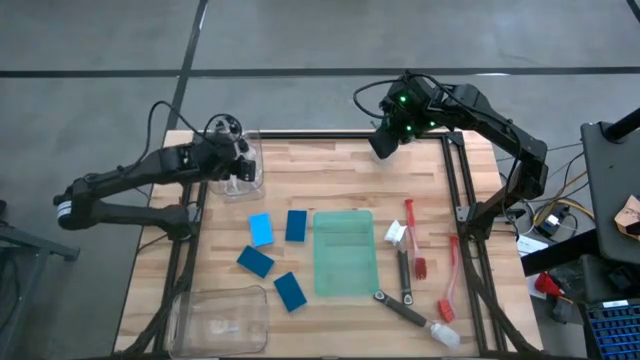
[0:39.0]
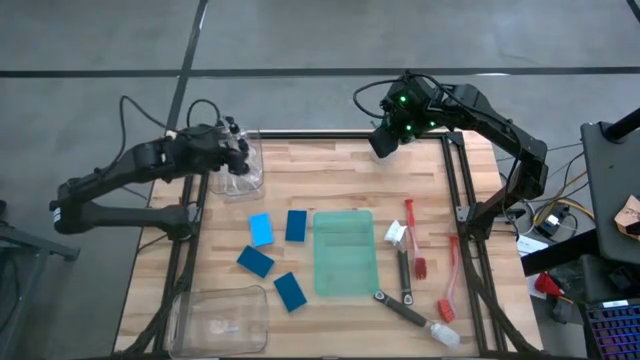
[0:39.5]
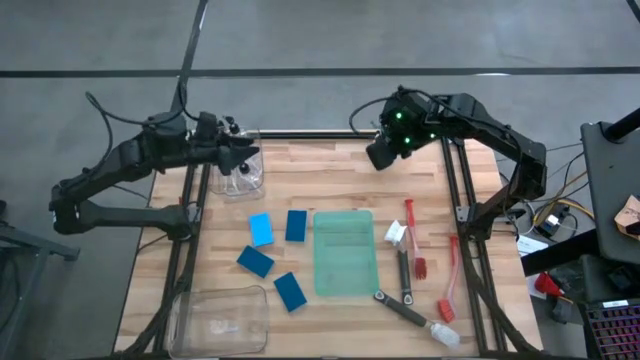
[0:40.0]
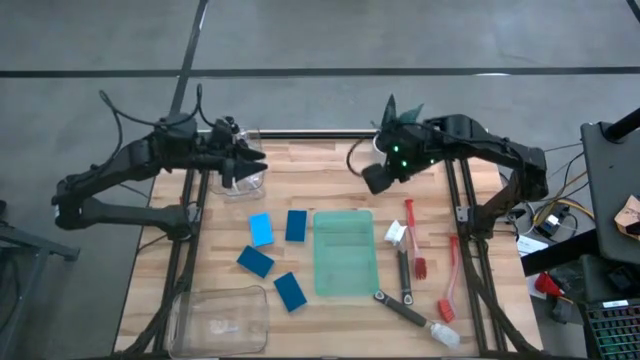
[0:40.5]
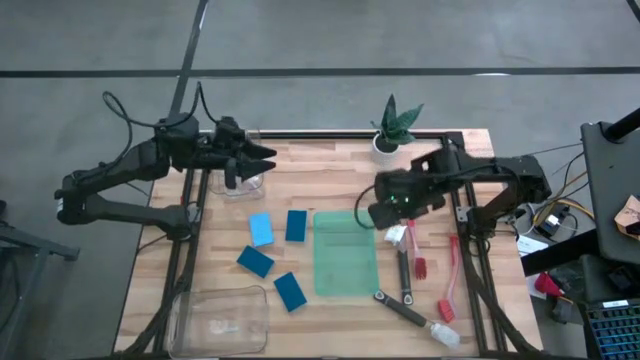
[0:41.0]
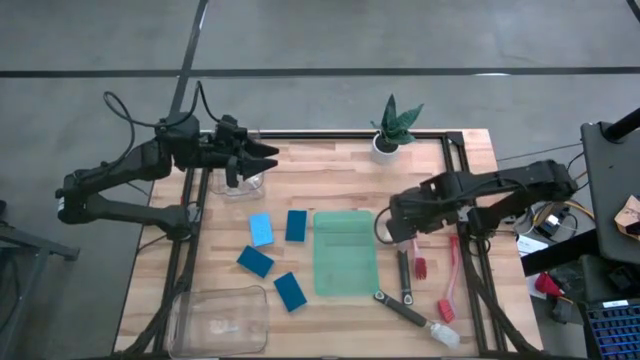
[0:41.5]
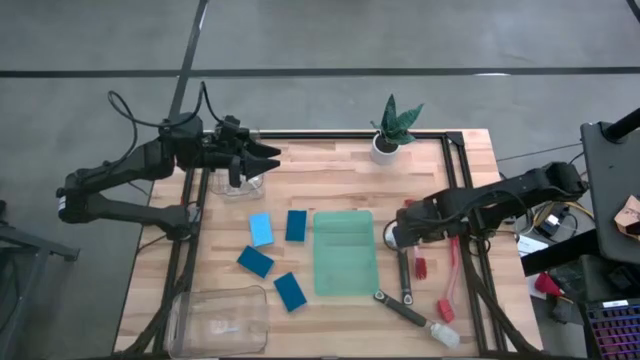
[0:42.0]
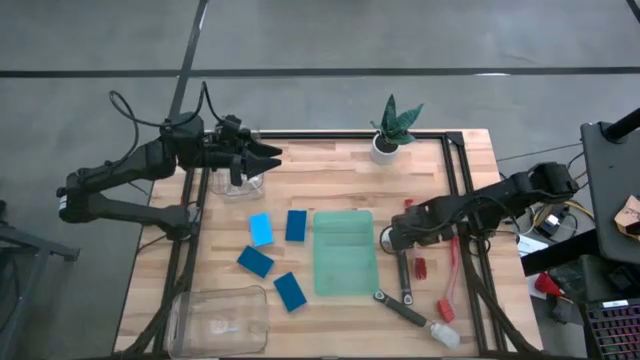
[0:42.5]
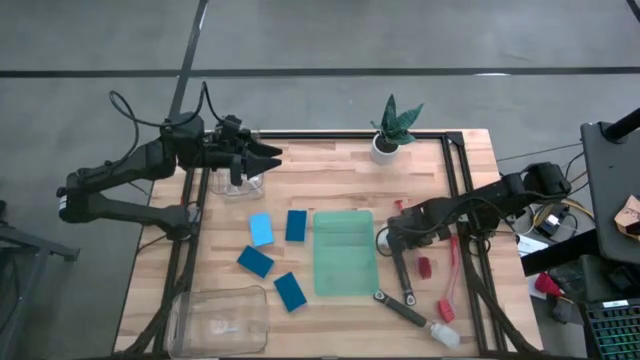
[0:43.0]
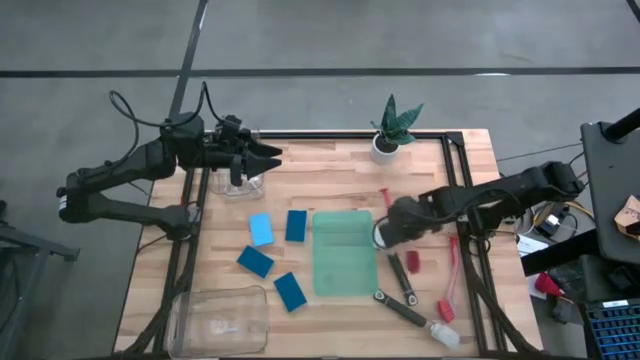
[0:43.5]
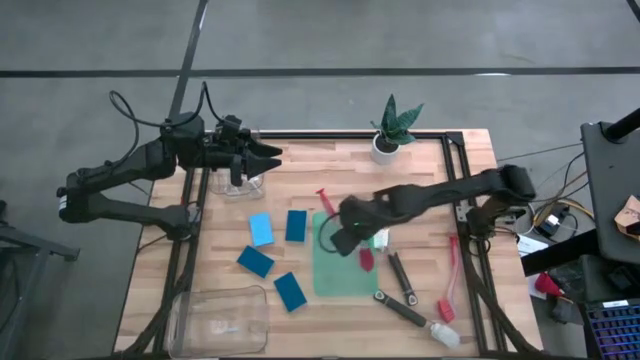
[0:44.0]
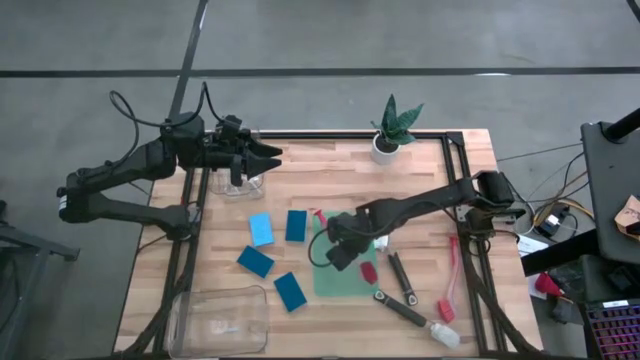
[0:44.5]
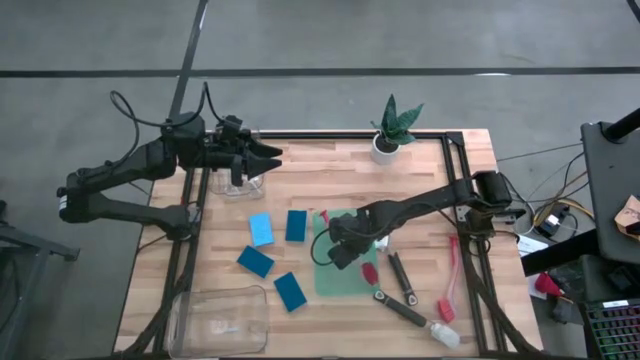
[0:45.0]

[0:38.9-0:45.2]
Task: Pick & Place Kitchen Sink Supplies
Put the red dish brush into the green bin

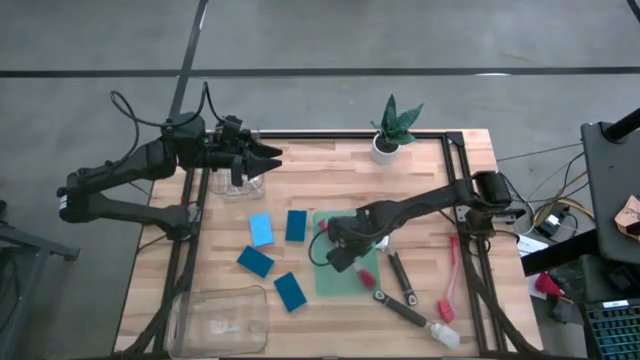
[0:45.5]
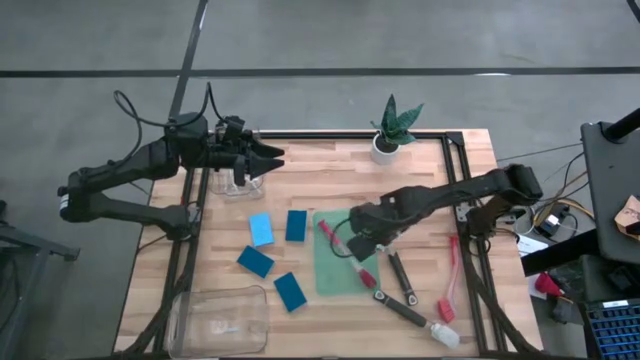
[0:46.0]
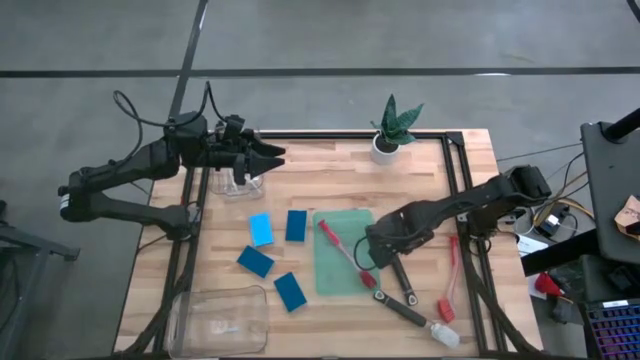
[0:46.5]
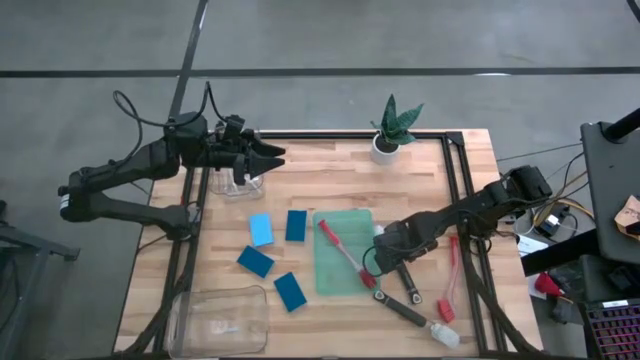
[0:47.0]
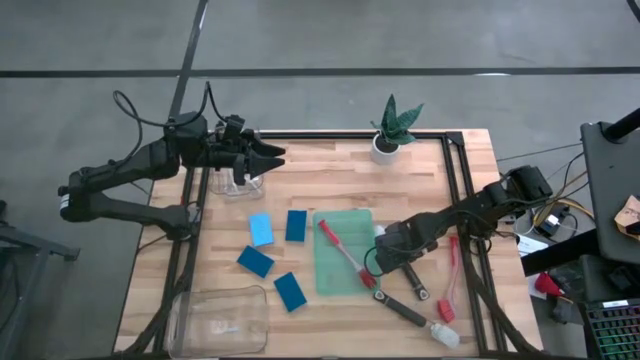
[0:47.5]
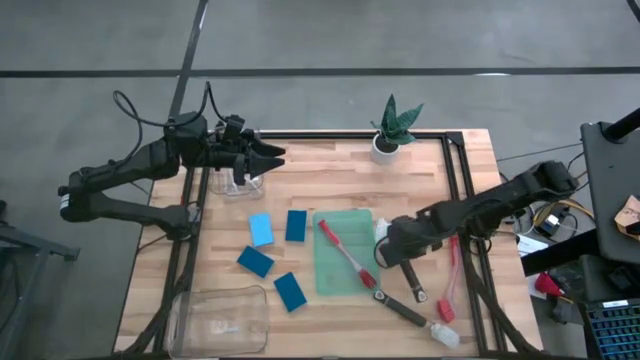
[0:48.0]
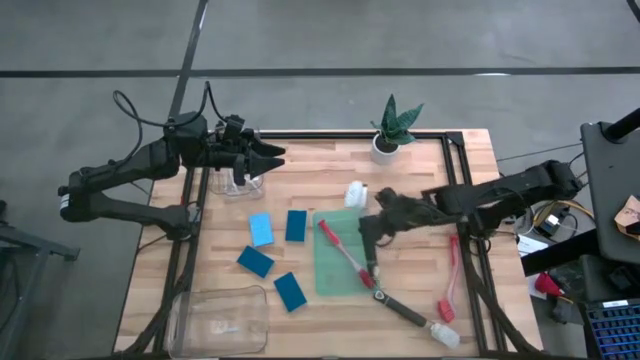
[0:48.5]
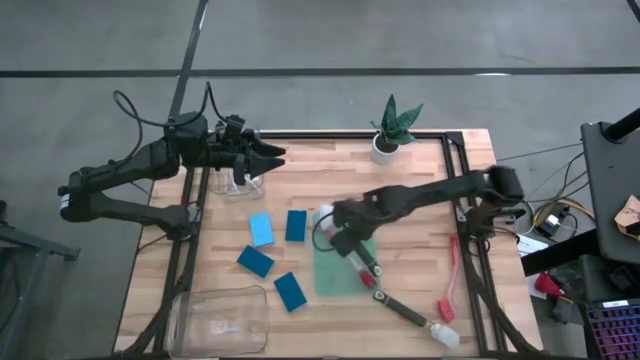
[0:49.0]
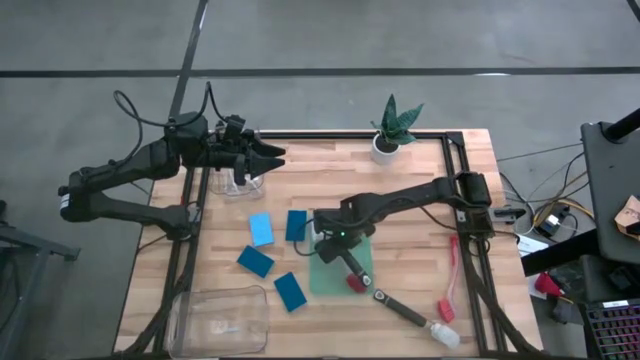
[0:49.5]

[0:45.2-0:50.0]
Put the black dish brush into the green bin

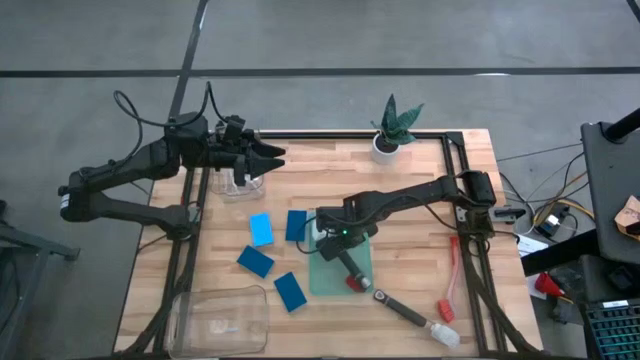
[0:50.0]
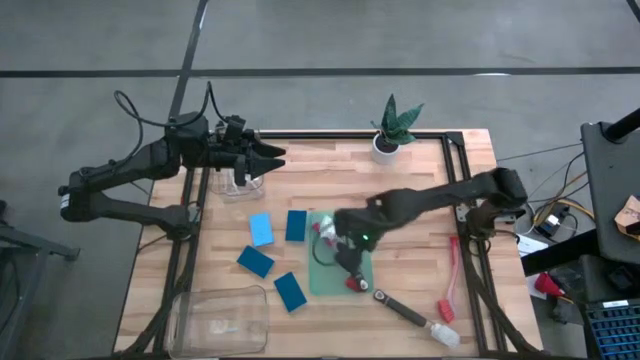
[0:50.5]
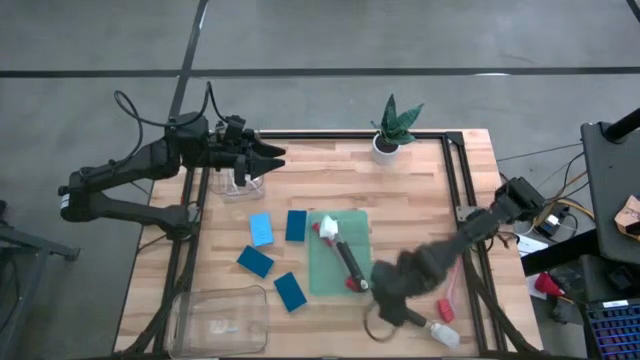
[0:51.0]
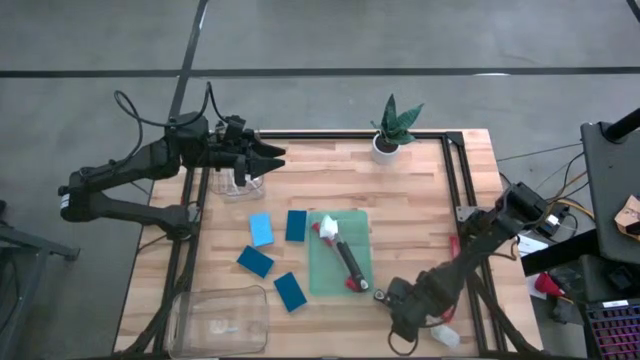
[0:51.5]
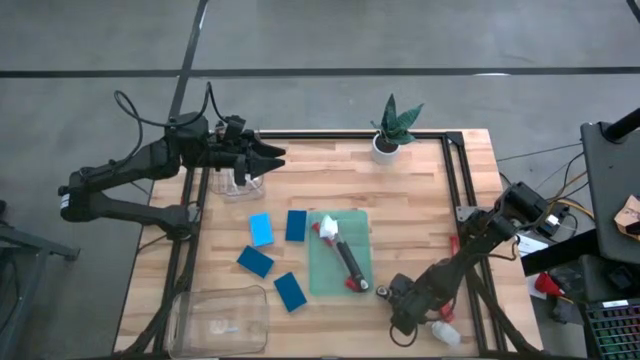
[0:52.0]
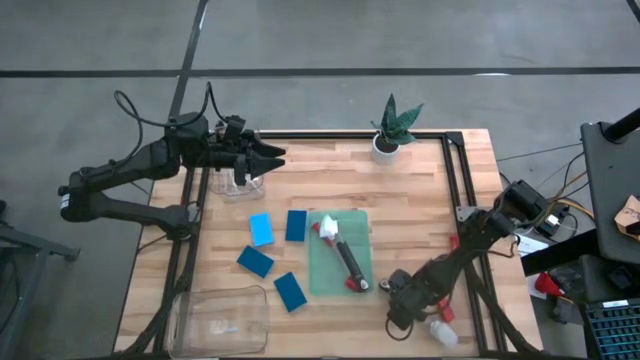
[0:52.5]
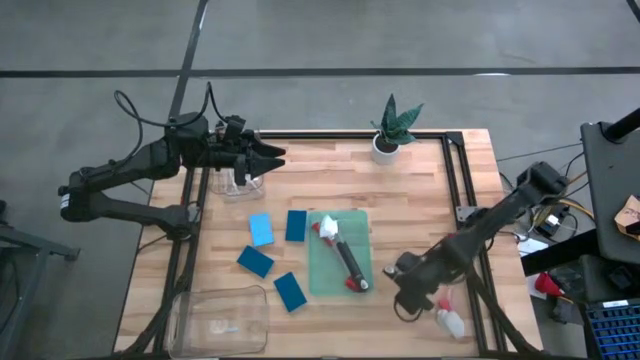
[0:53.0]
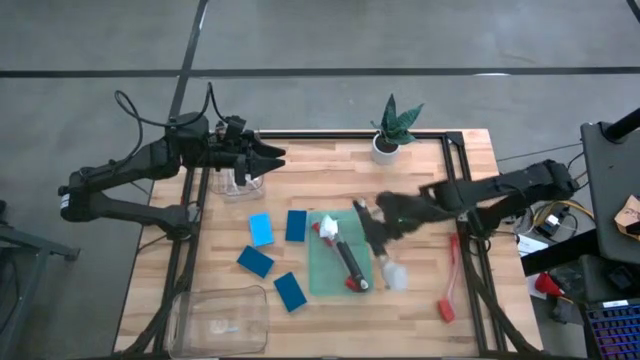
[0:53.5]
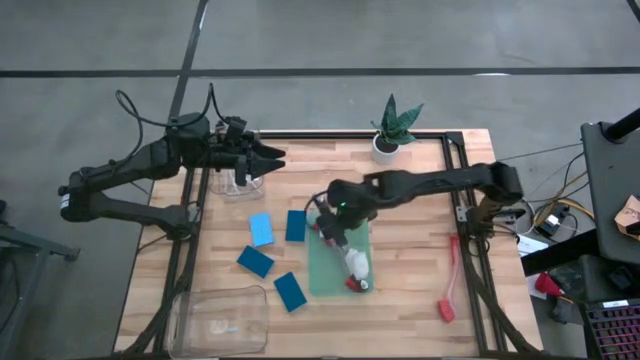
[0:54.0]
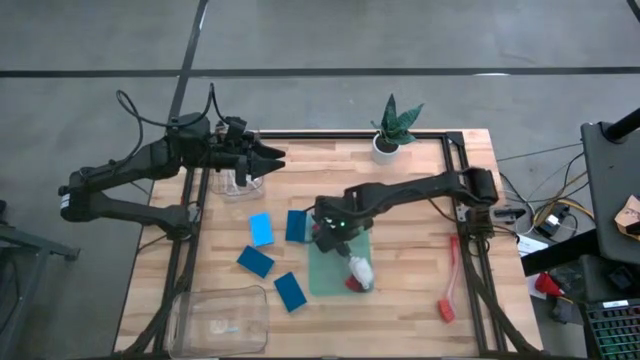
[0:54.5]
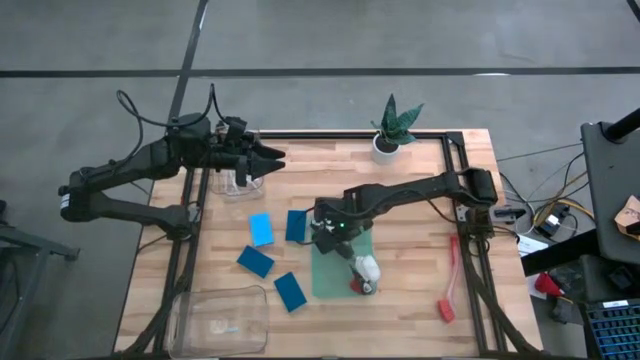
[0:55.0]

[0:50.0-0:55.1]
Put the black dish brush into the green bin

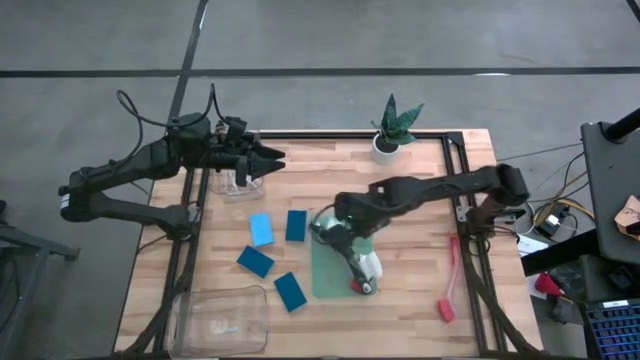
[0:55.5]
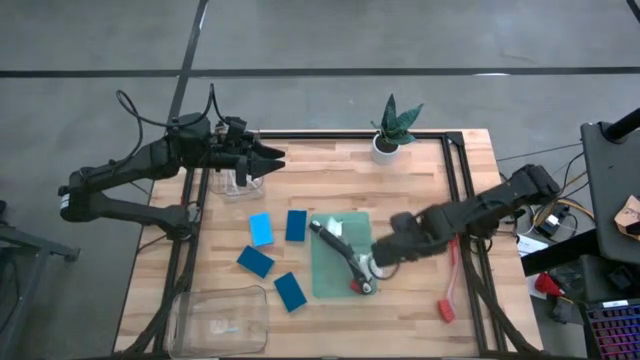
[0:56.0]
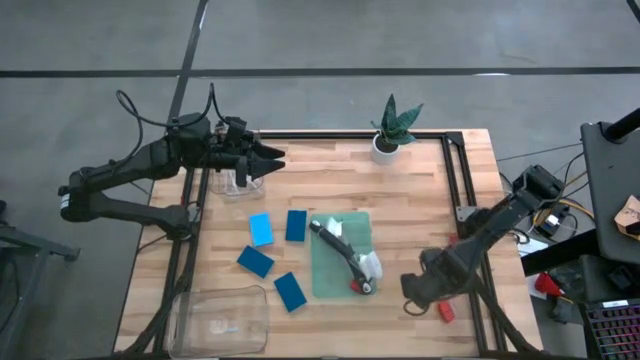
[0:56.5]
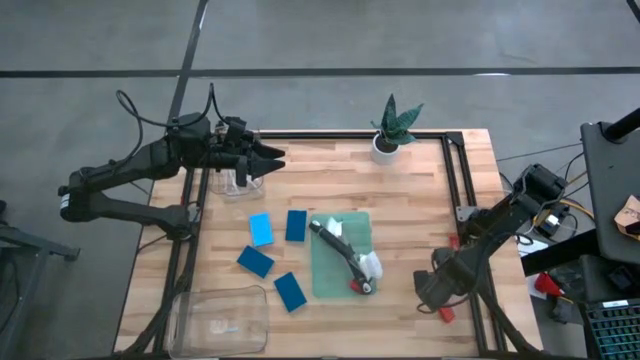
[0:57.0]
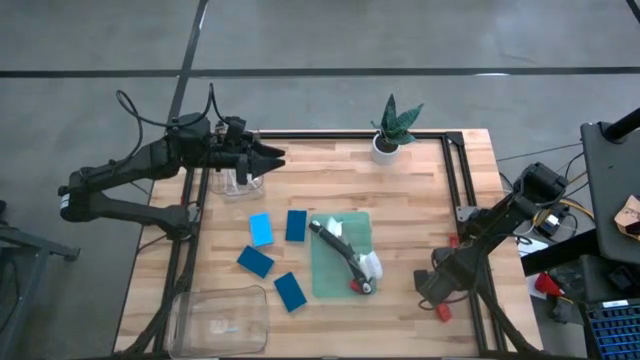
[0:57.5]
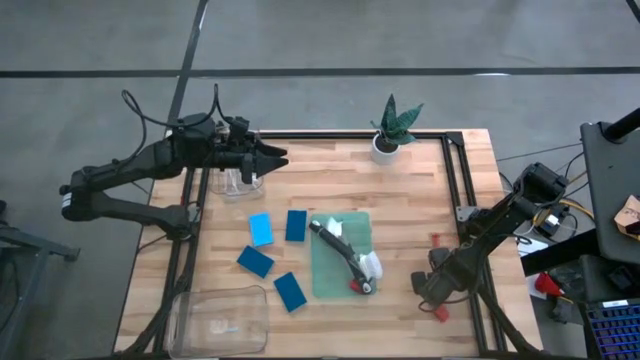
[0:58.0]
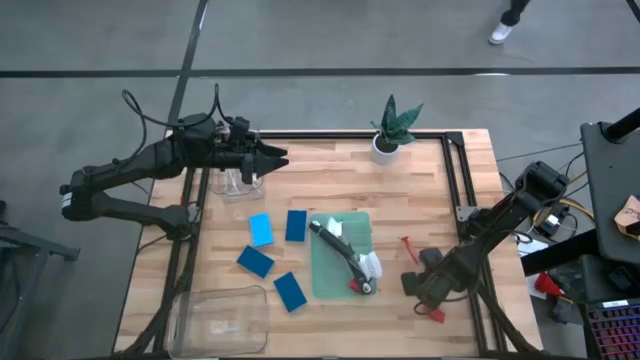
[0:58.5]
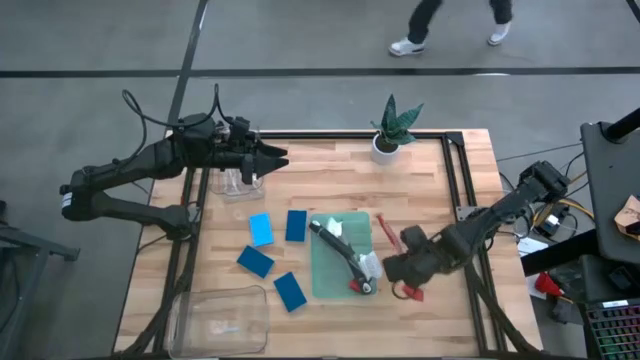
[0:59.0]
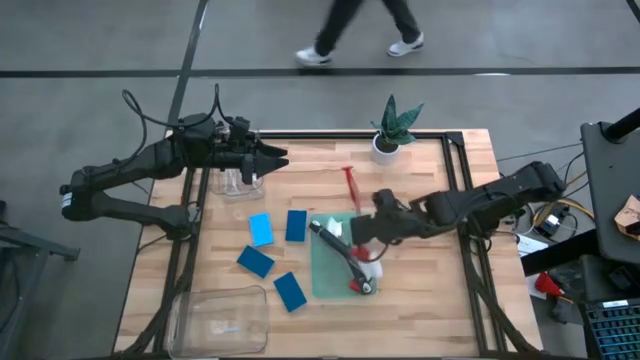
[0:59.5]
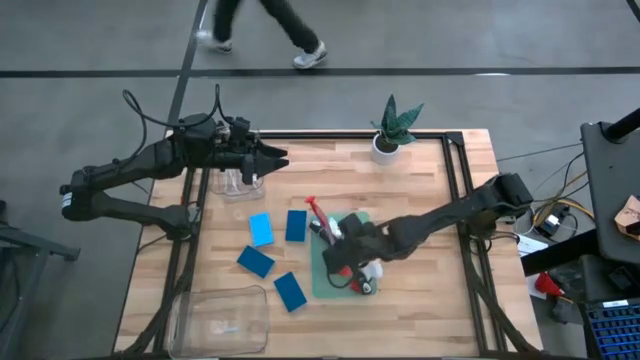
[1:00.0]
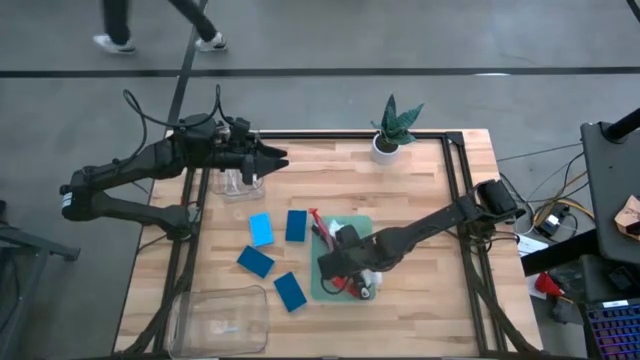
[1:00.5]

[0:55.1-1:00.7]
Put the red dish brush into the green bin
